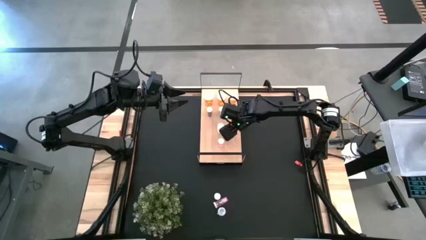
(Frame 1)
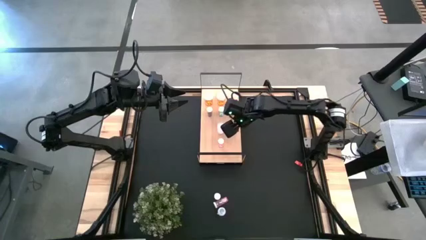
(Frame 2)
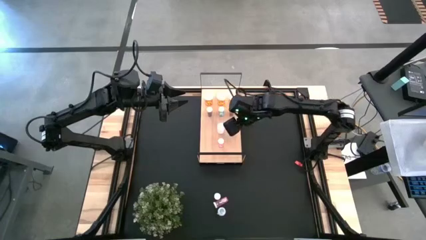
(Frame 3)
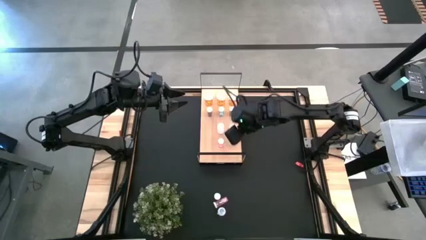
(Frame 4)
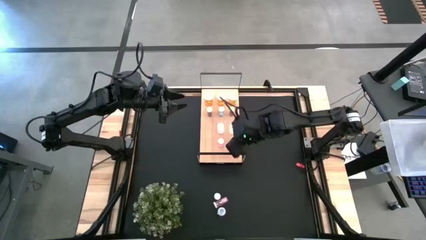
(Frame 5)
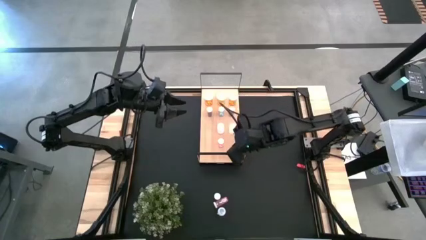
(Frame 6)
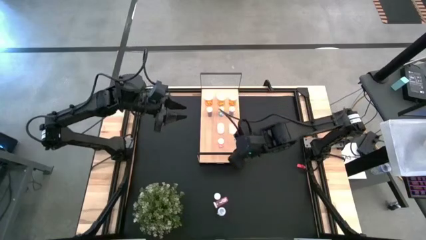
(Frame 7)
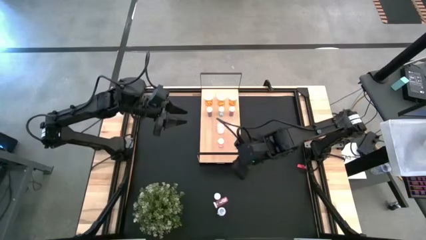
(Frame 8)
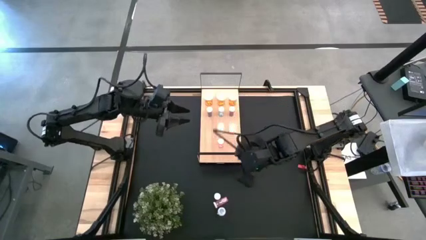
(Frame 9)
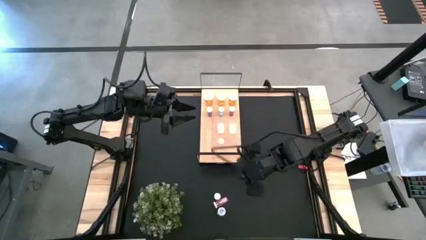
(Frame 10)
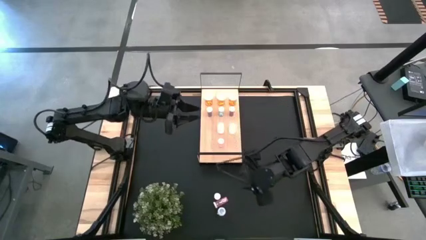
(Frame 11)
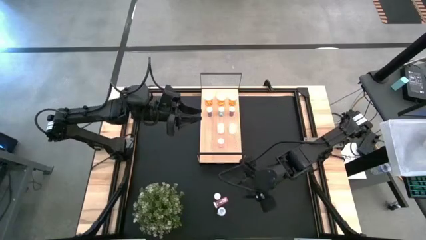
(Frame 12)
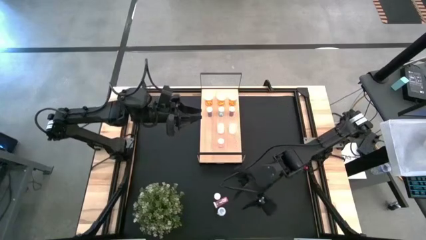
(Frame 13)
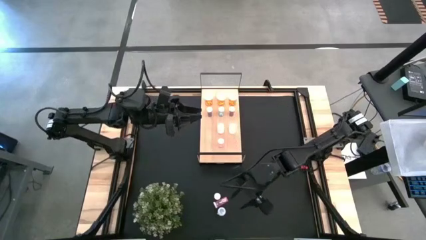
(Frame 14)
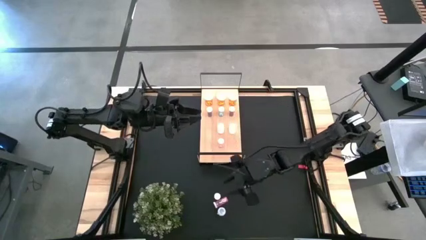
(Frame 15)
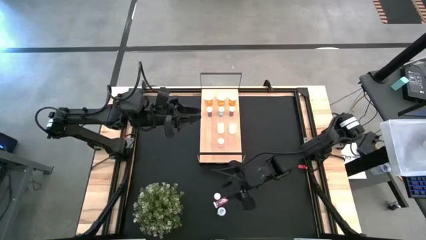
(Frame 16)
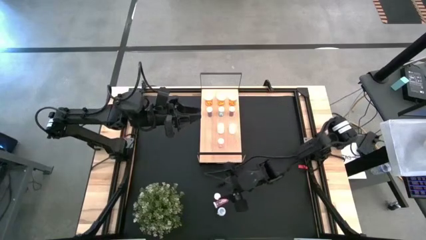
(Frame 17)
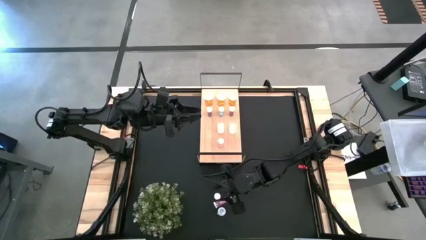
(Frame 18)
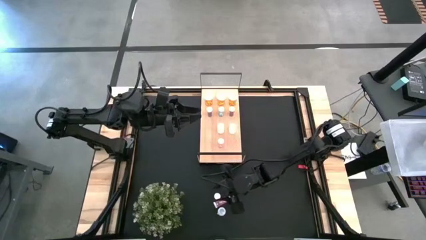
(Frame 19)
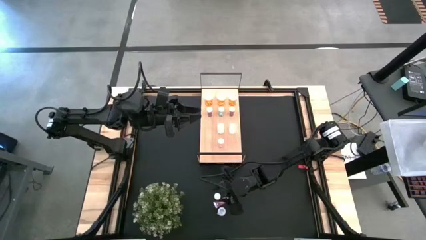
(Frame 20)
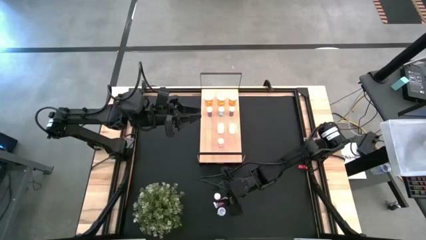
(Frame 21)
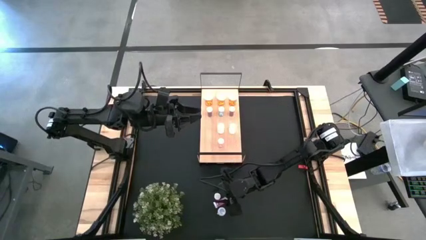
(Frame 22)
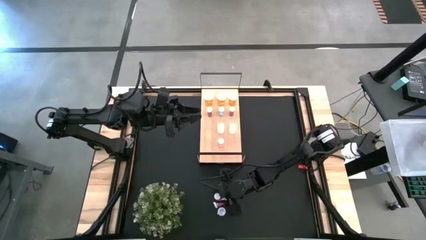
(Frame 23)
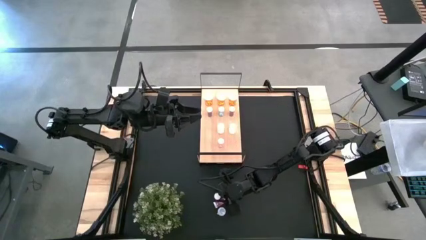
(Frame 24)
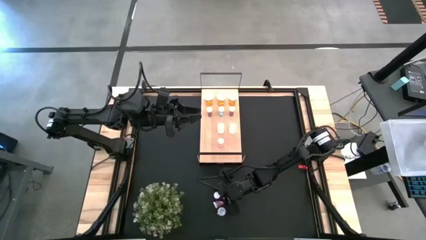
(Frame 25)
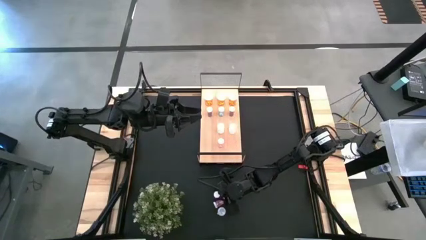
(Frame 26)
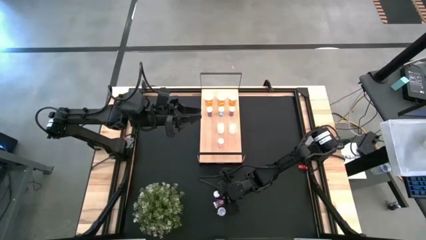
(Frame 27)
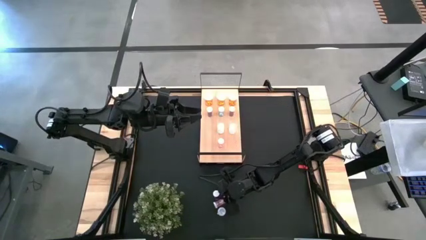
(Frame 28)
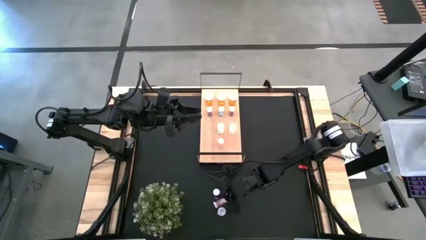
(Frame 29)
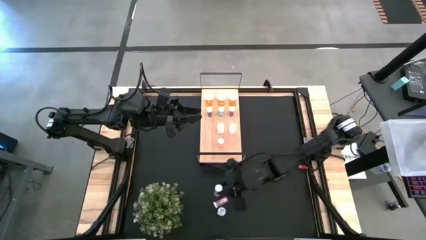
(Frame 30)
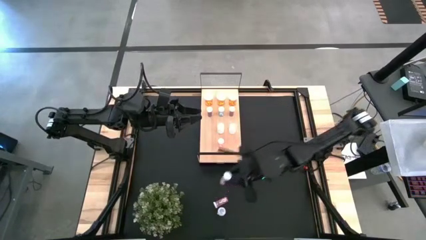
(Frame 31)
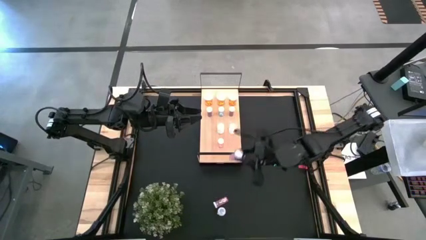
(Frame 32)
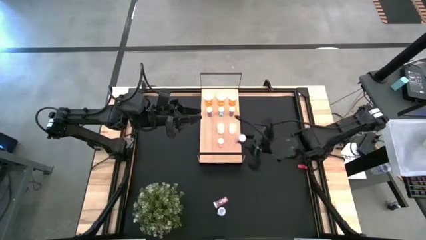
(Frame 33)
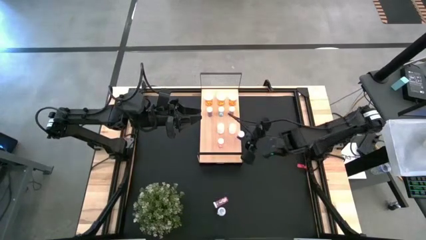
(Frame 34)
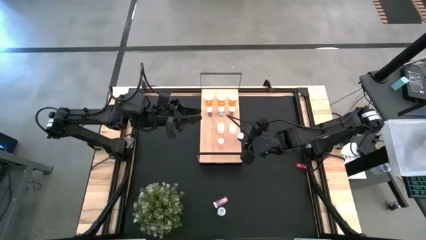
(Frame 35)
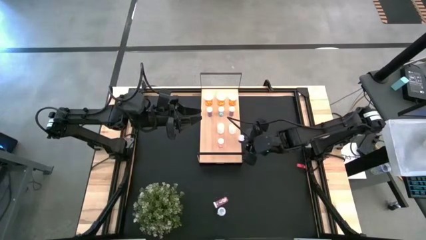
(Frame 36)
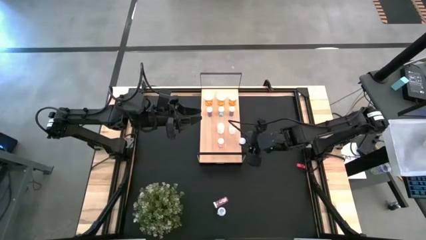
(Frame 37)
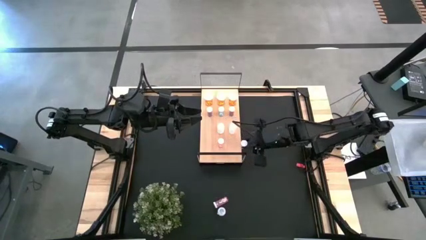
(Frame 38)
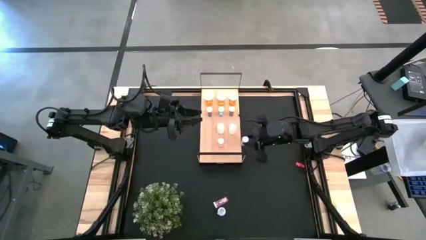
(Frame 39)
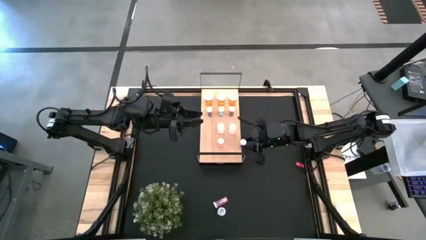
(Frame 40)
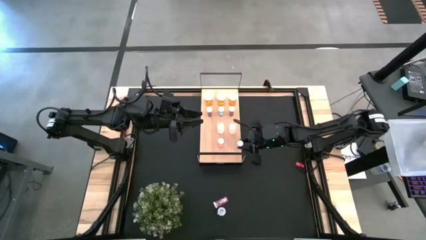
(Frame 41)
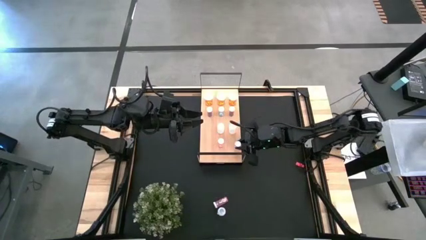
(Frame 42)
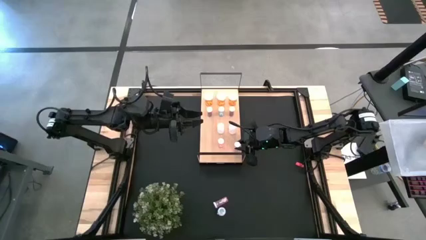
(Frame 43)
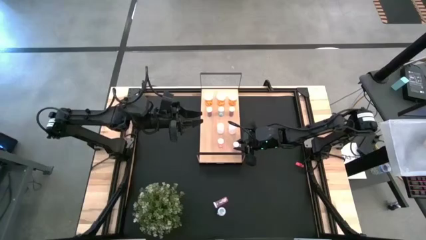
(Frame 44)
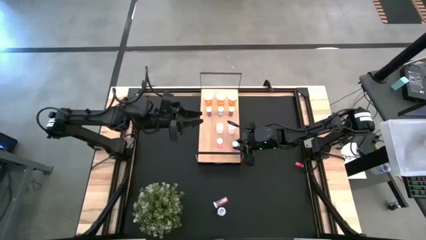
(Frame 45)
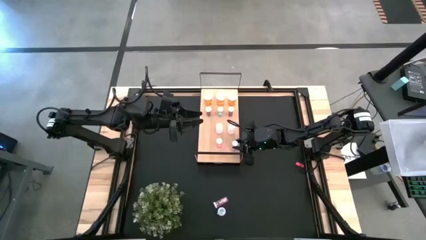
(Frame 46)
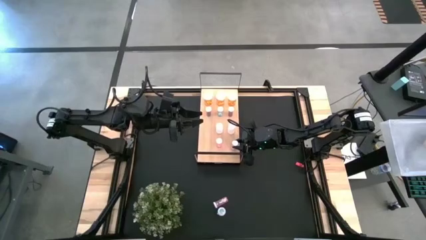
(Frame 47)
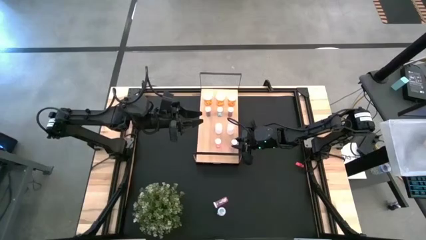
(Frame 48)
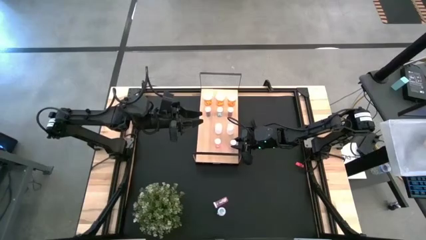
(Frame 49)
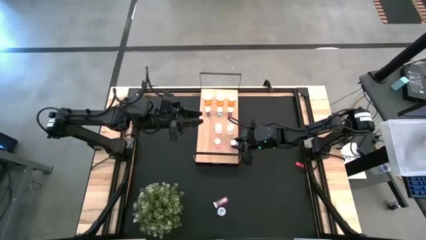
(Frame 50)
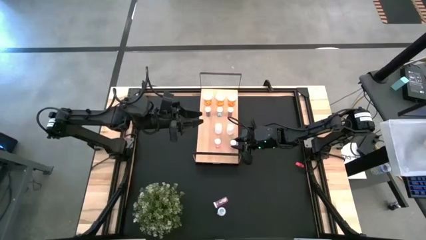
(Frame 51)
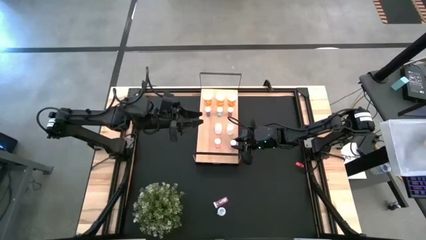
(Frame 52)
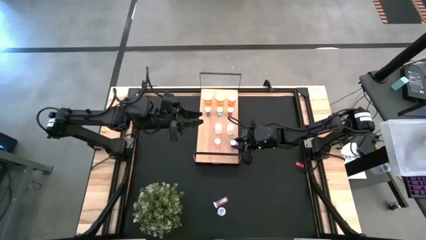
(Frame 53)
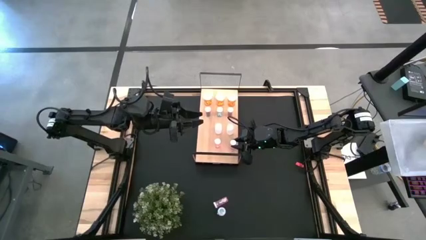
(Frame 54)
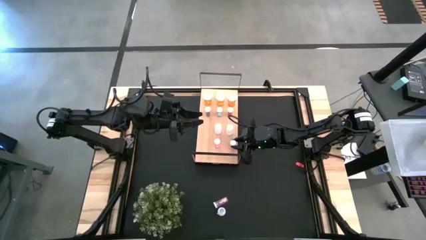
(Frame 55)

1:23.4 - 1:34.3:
Task: Pick and place medicine bottles onto shelf by color
Put the top pink pill bottle aligned with the other pink pill bottle on the shelf

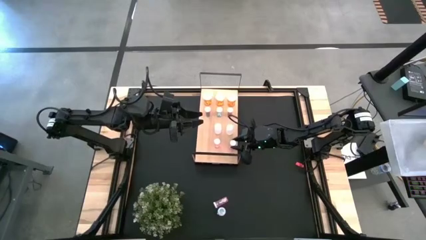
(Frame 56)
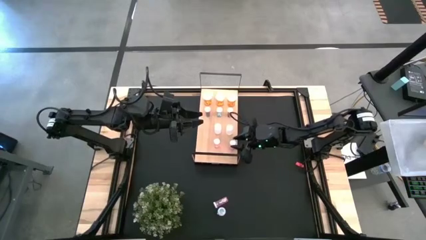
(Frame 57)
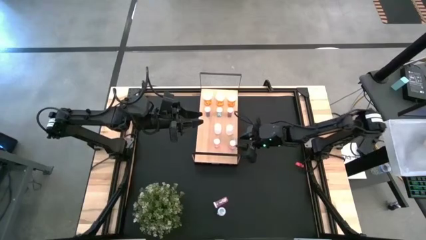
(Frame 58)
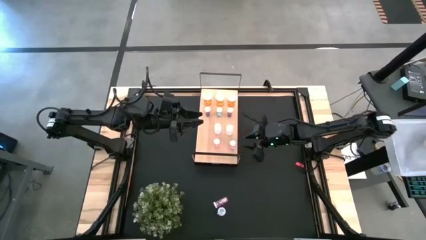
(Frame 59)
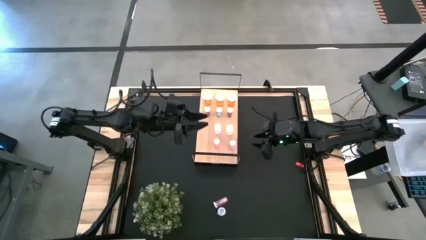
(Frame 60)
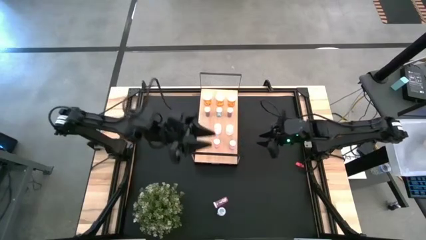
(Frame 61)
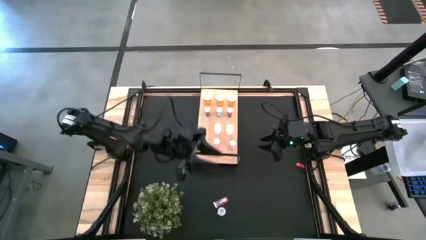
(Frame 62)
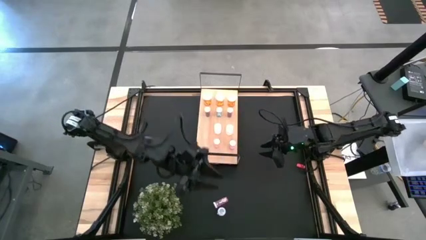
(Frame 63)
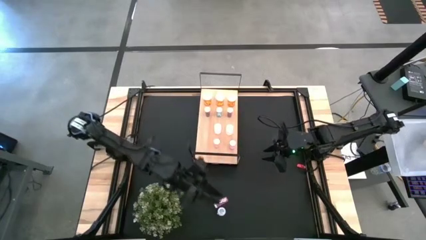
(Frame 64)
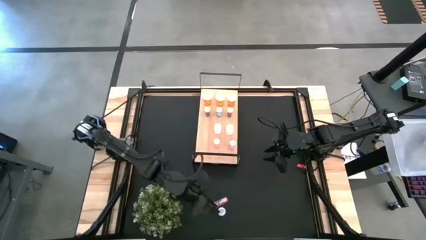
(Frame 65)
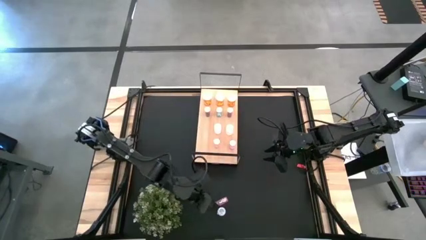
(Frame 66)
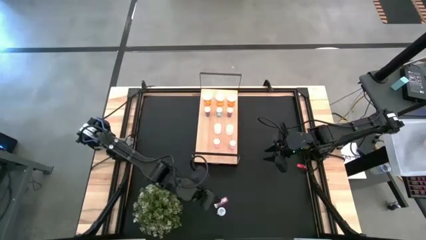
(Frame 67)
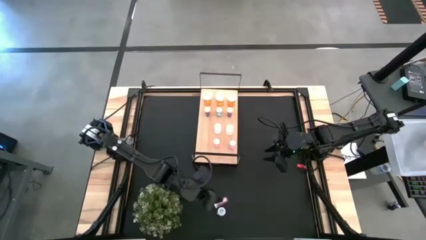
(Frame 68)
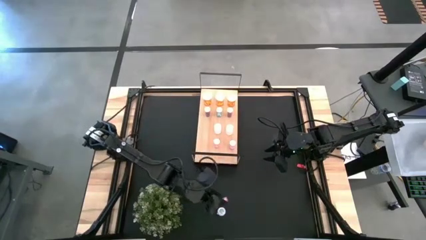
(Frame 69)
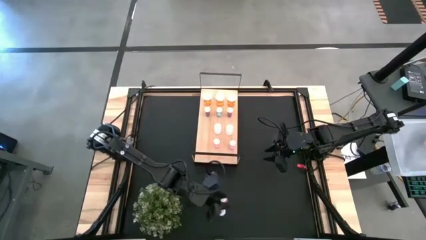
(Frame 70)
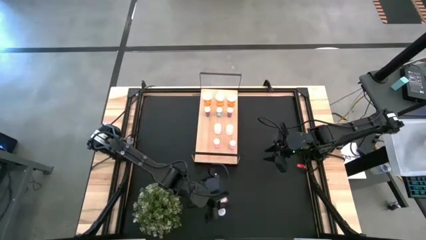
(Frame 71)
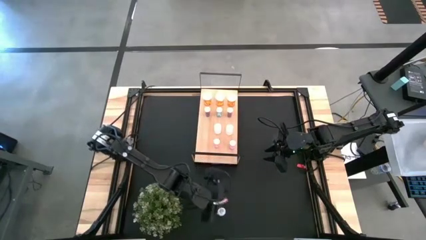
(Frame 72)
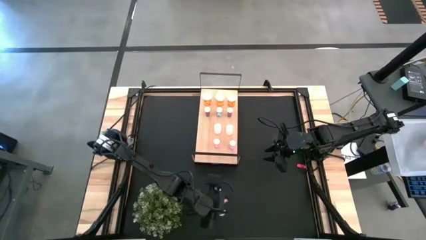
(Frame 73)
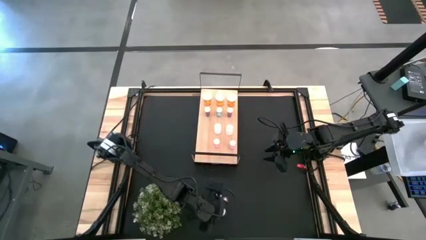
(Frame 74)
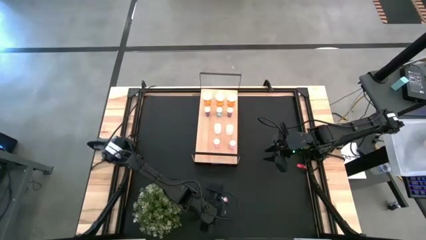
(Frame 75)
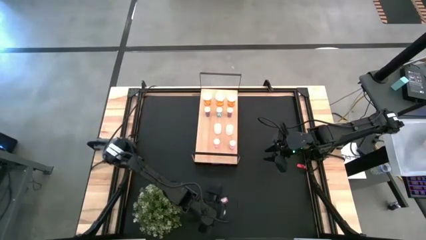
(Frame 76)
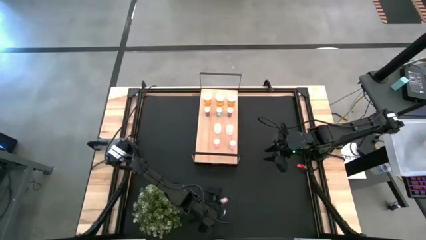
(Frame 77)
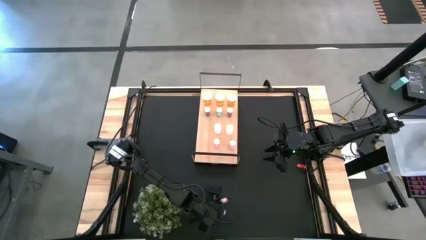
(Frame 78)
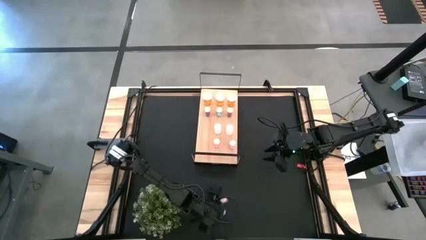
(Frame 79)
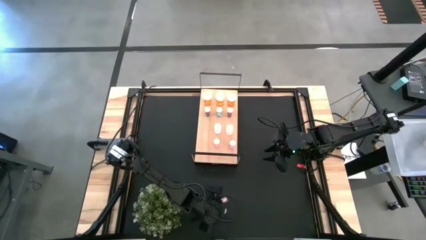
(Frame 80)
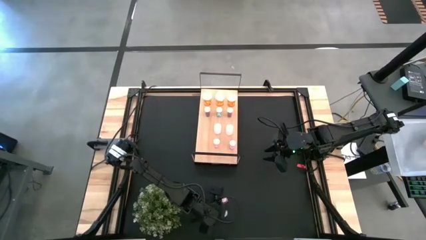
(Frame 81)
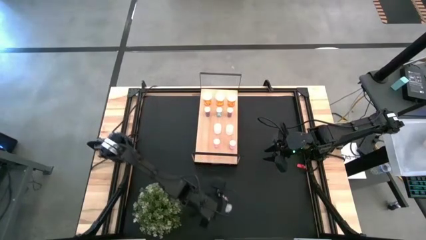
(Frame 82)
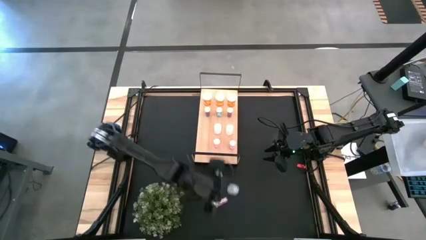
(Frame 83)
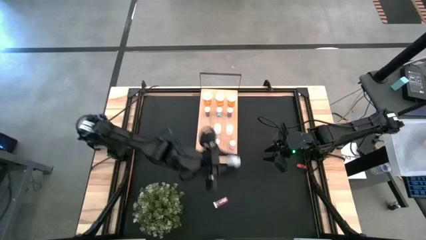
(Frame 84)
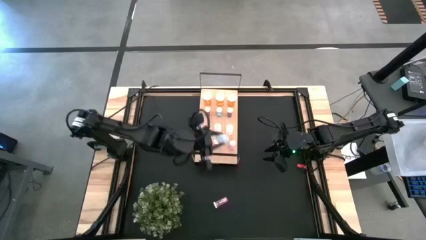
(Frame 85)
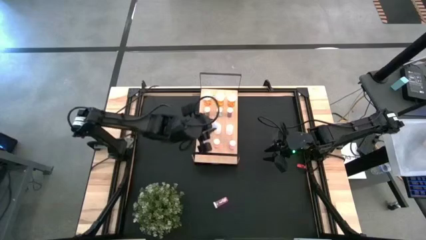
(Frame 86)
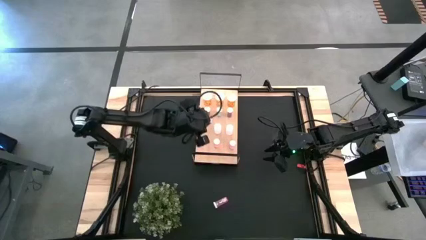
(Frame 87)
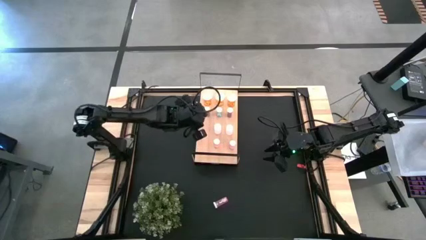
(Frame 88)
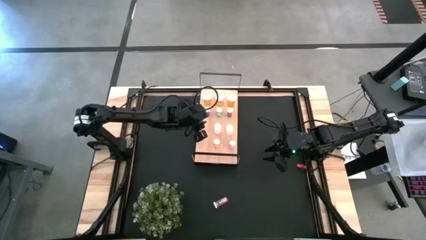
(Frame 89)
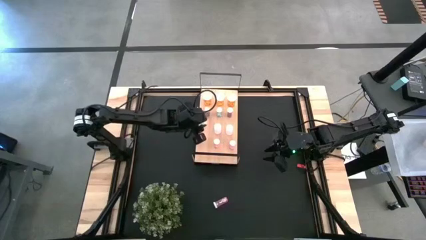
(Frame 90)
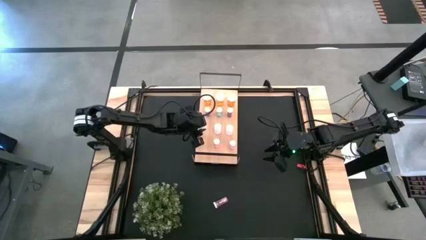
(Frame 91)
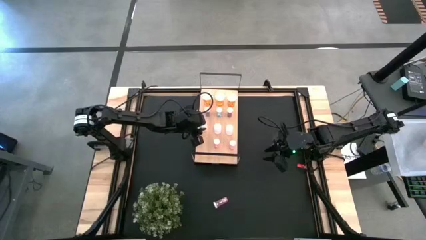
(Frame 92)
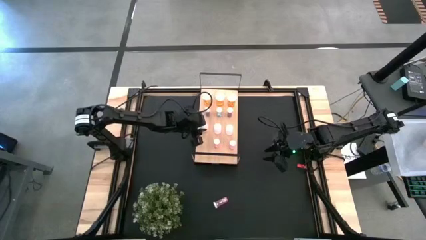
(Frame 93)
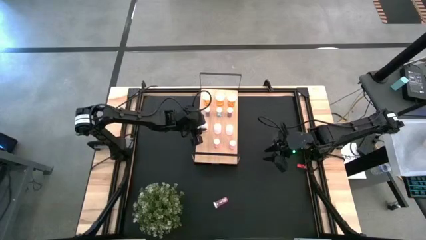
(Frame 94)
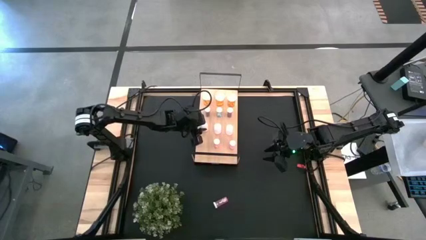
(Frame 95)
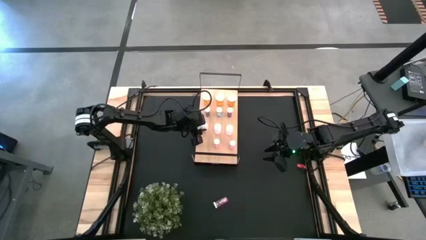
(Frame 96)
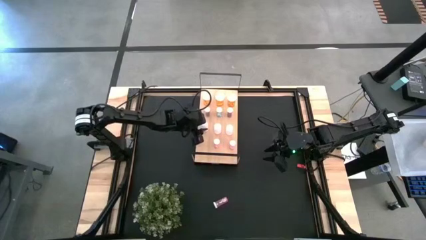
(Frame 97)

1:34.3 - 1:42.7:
Put the white pill bottle aligned with the other white pill bottles on the shelf
